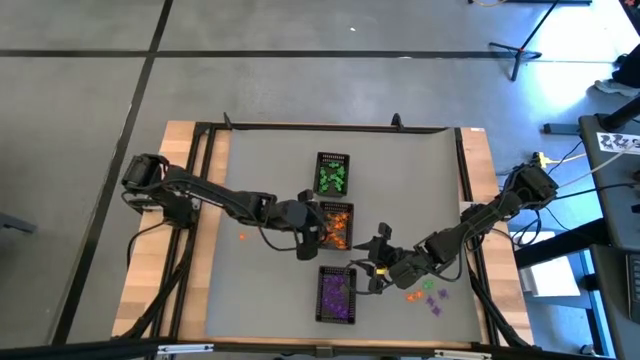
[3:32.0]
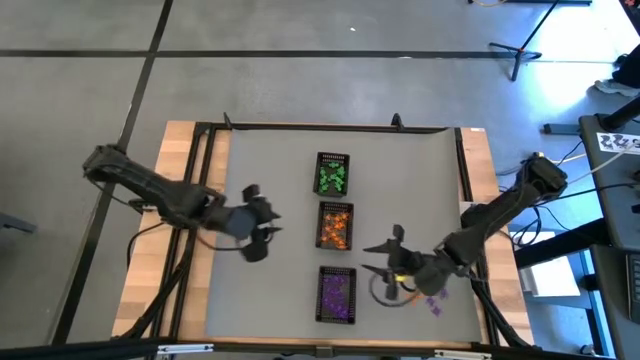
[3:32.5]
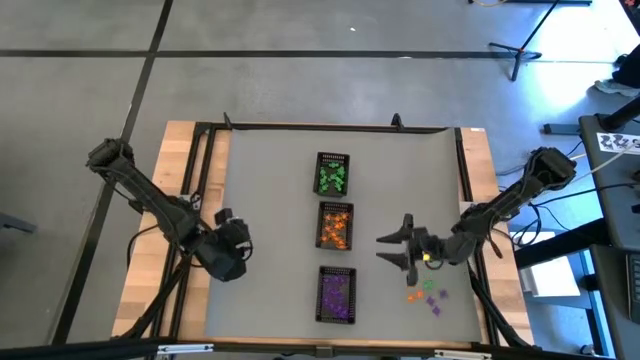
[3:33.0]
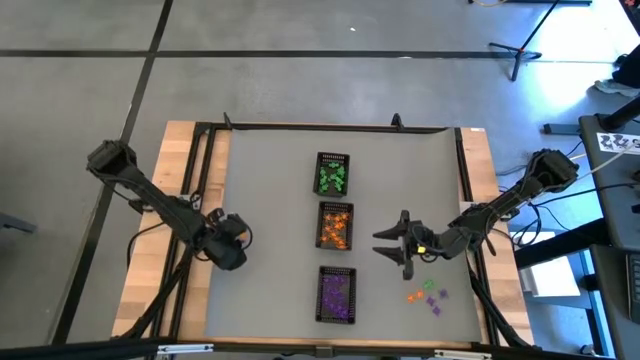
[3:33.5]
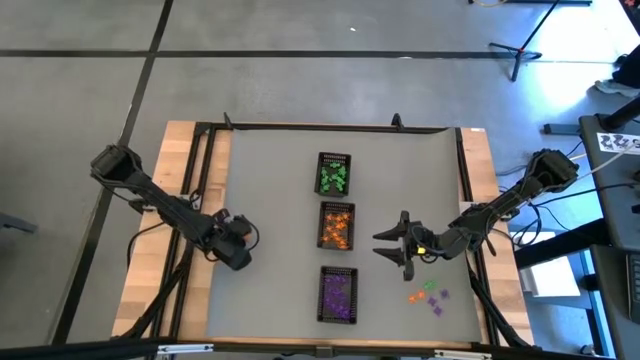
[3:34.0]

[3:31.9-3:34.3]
Task: Sort Halloween decoration
Put the orange spider toy into the middle black bin

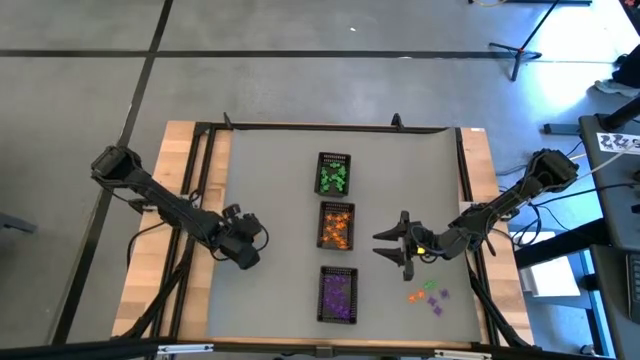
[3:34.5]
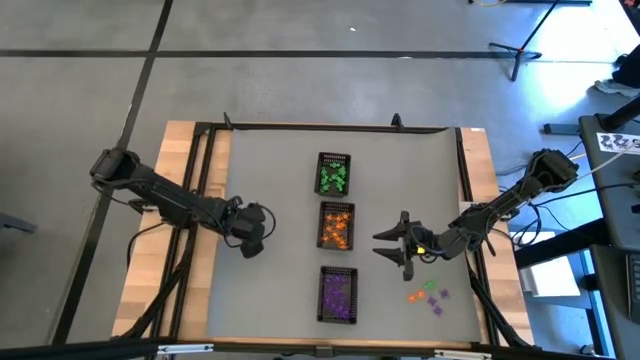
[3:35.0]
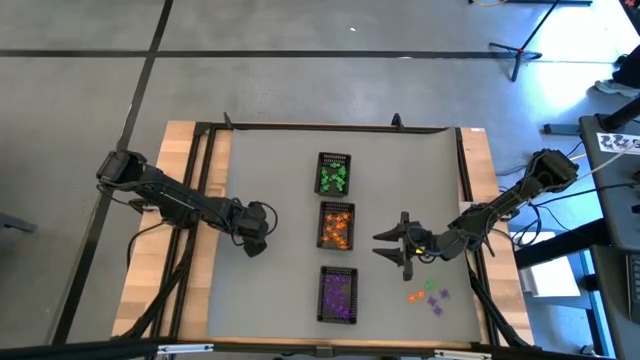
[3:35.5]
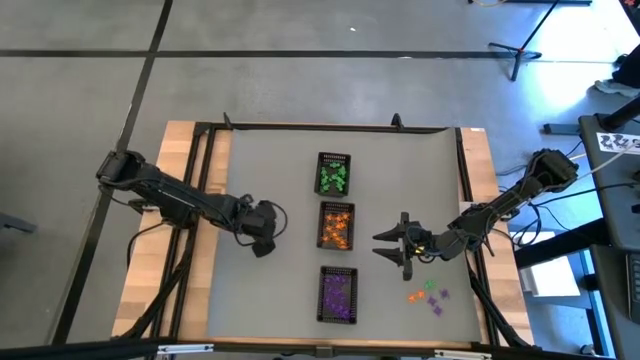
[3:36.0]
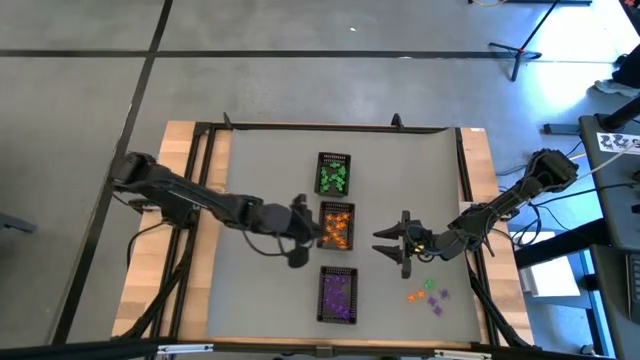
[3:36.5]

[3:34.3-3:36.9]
Put the orange spider toy into the middle black bin

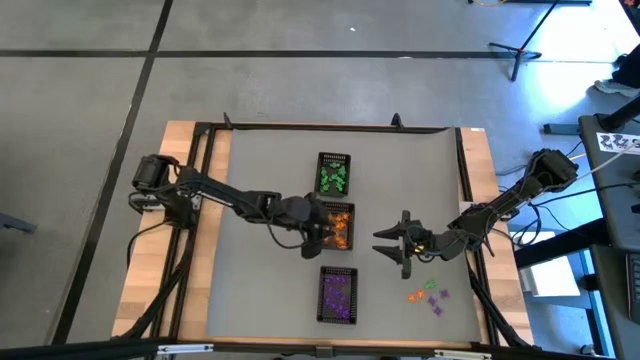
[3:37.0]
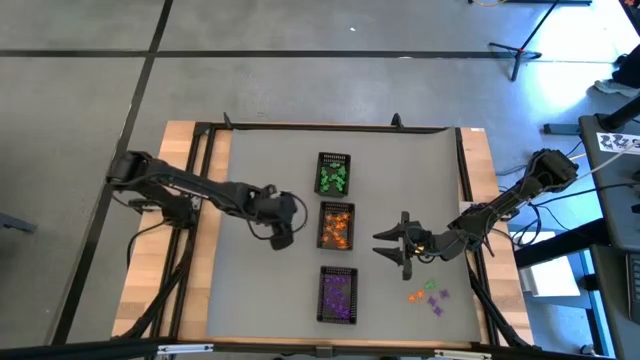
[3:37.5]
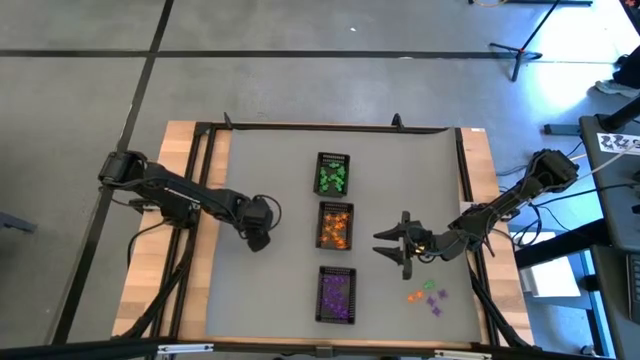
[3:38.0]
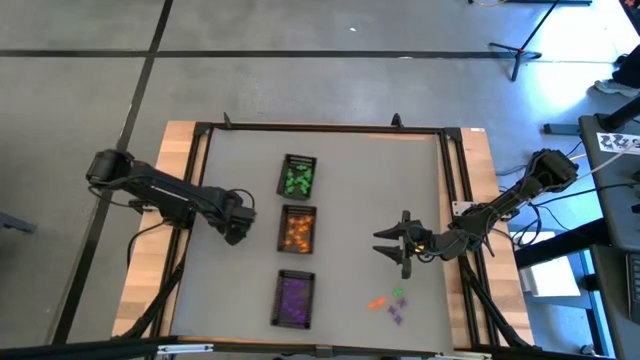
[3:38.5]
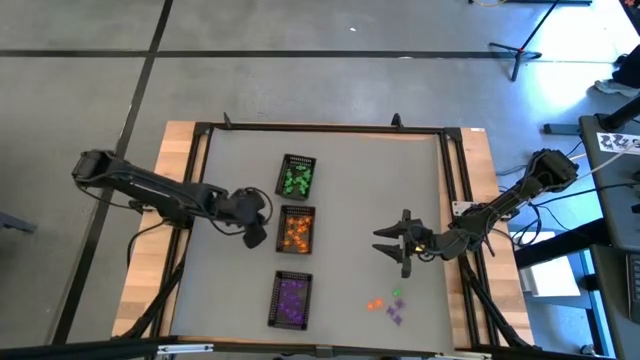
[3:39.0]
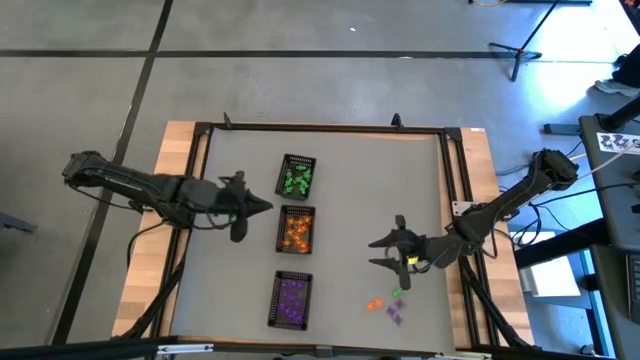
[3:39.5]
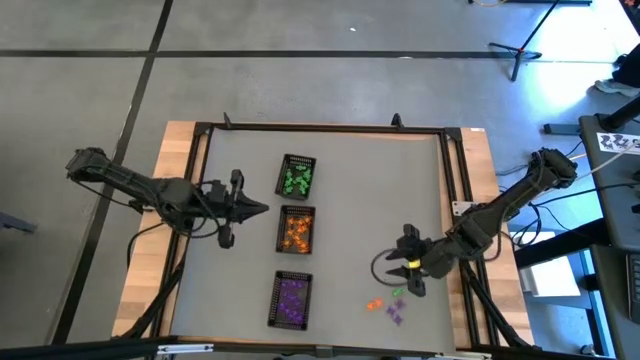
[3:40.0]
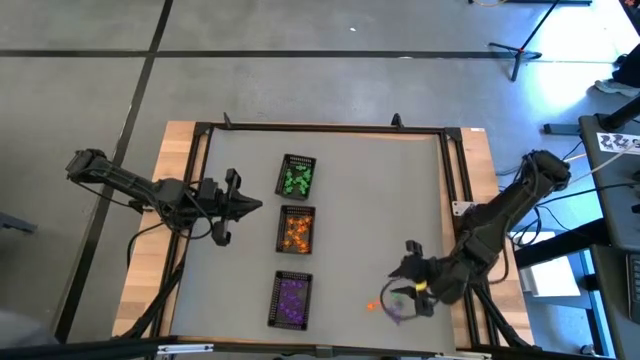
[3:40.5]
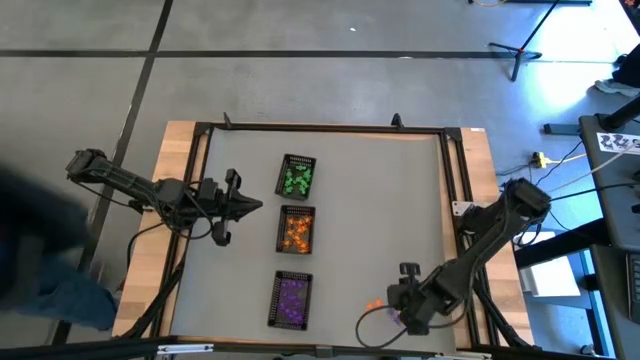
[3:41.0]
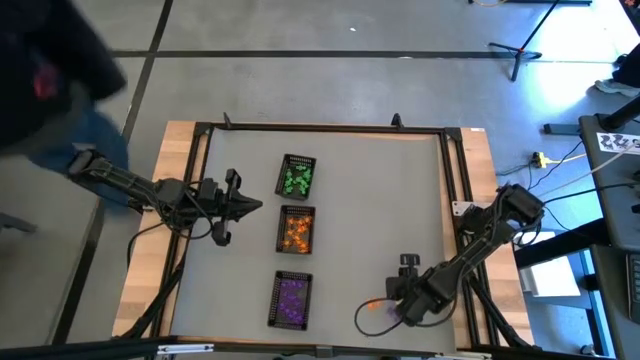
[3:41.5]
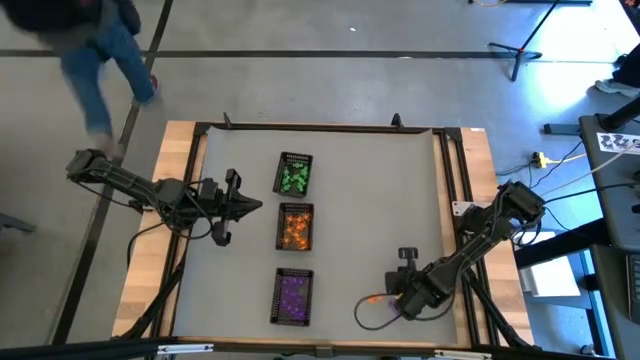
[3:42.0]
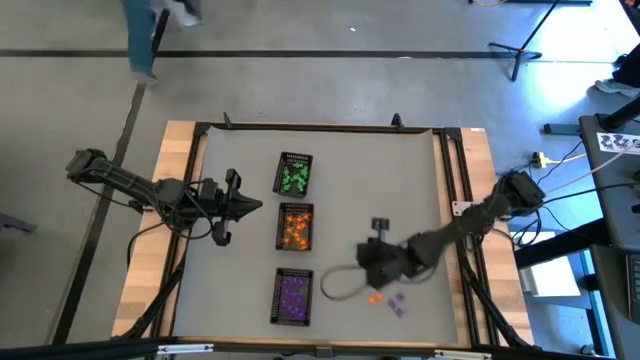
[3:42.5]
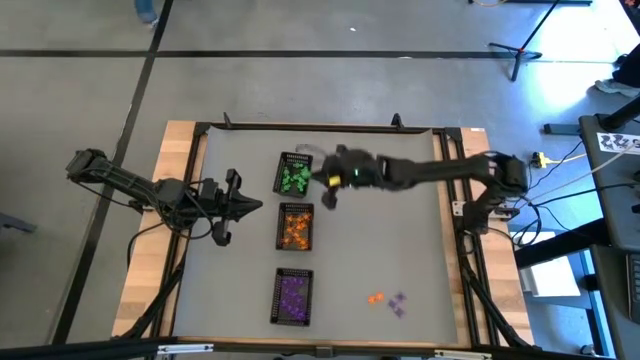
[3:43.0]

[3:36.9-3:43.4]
Put the green skeleton toy into the top black bin

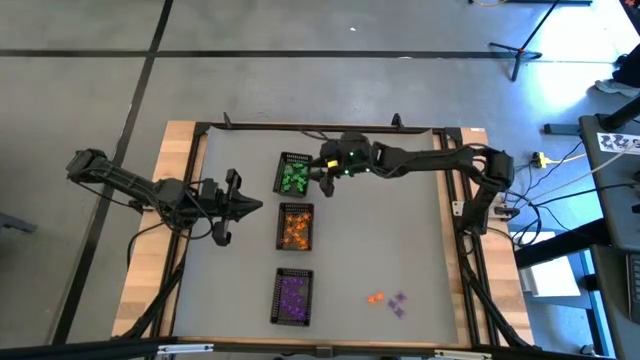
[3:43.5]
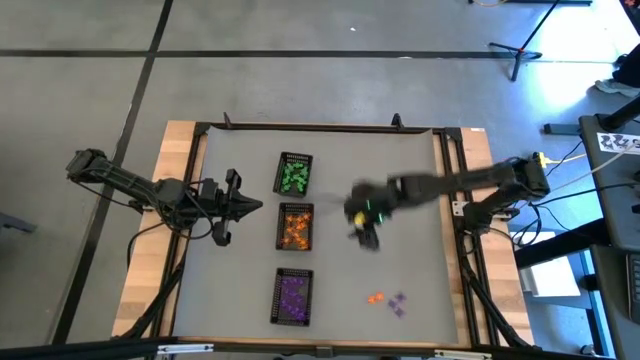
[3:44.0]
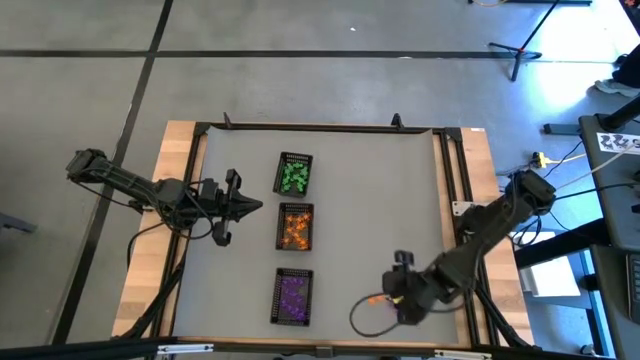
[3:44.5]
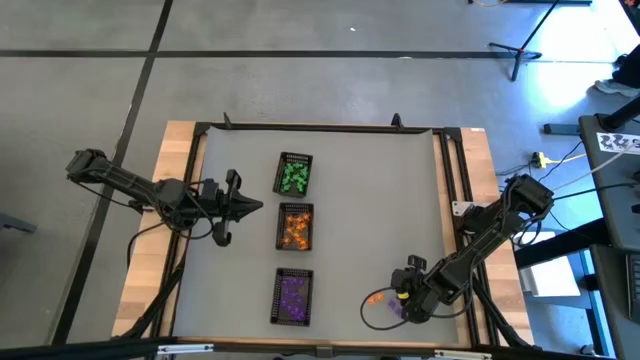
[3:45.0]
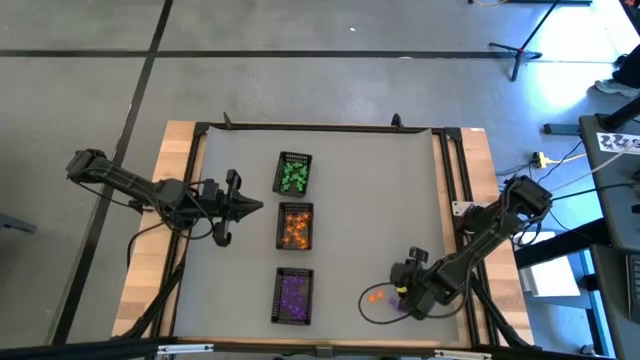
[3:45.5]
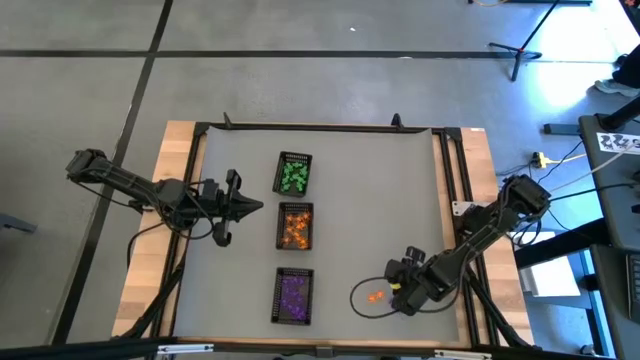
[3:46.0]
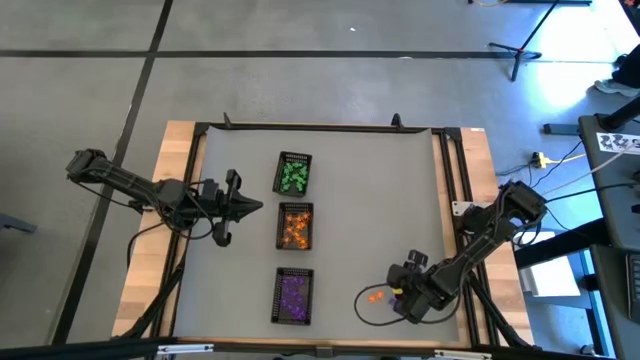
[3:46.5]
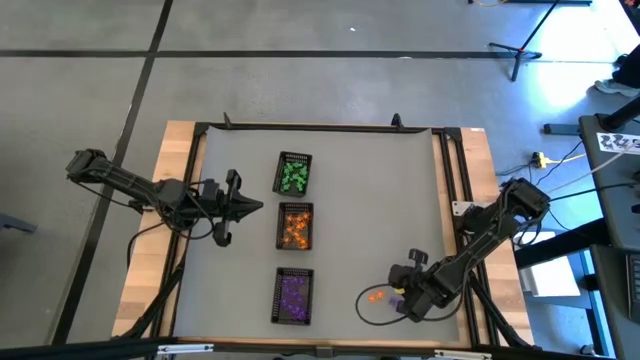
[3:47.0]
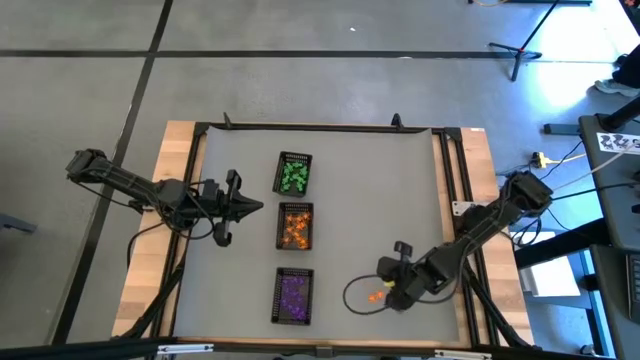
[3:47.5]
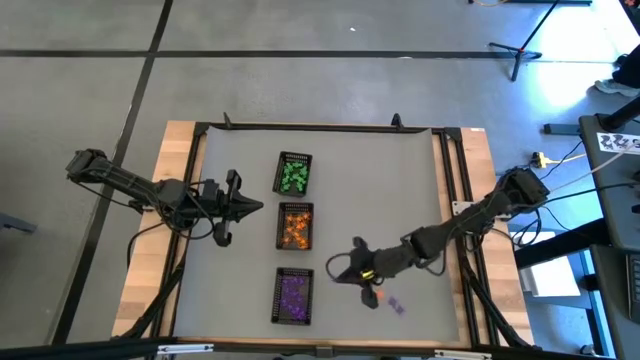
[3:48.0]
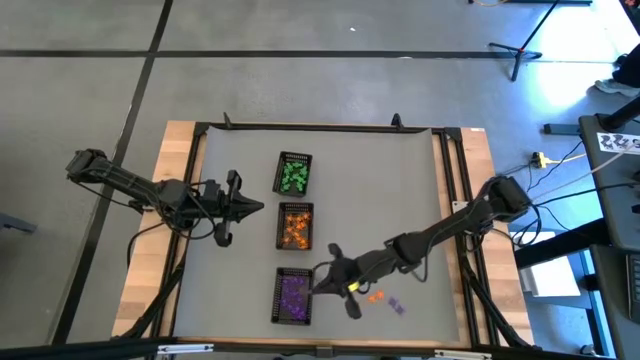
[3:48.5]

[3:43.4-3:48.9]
Put the violet spider toy into the bottom black bin

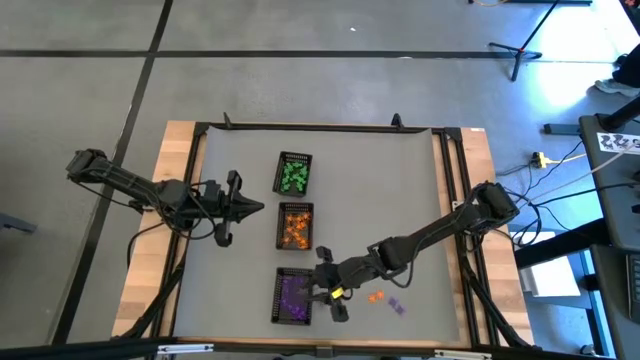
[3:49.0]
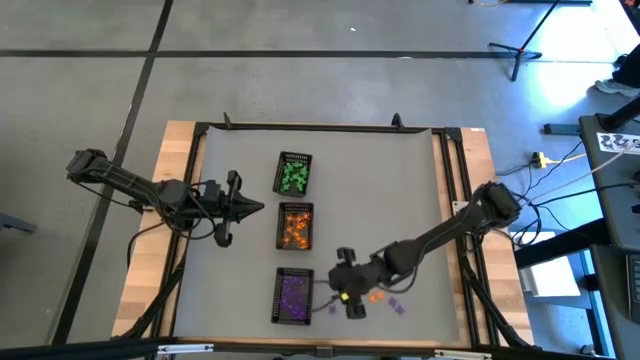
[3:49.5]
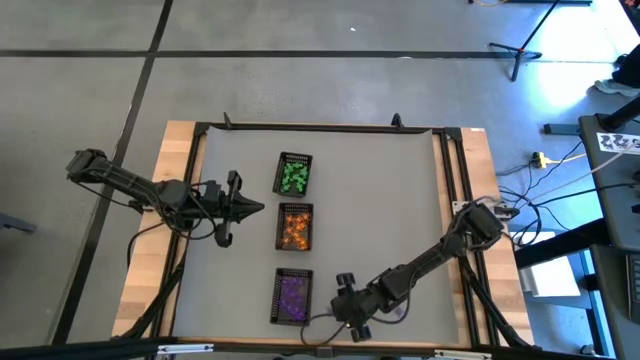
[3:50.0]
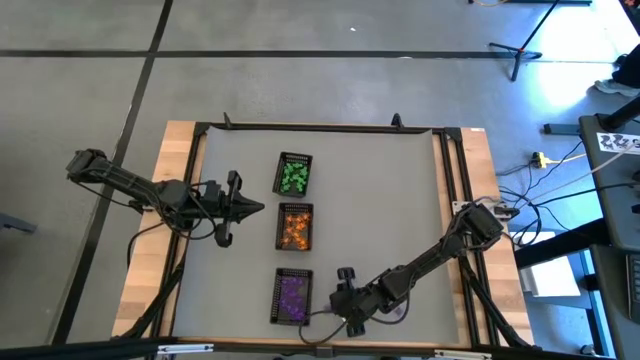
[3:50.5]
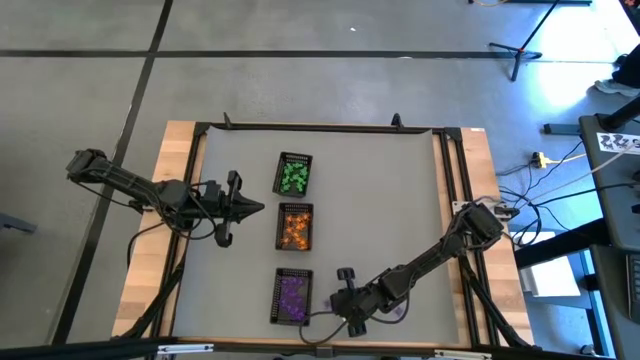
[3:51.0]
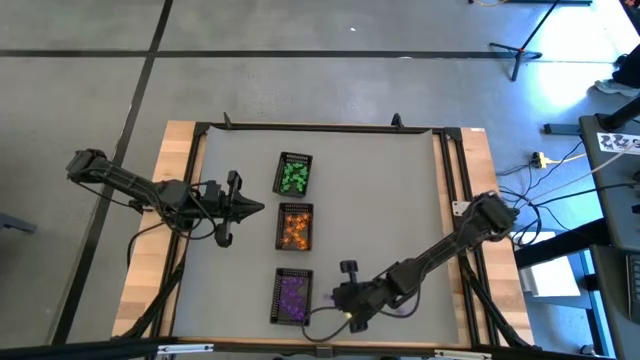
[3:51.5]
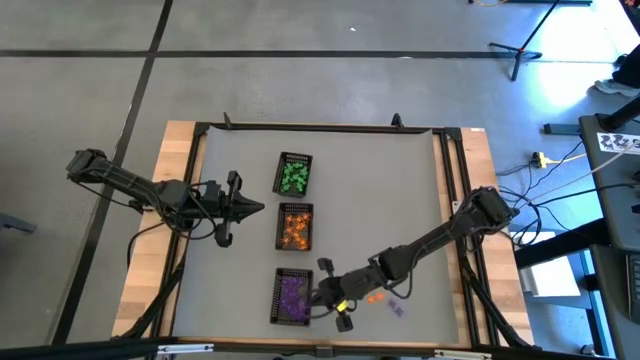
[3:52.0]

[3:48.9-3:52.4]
Put the violet spider toy into the bottom black bin
